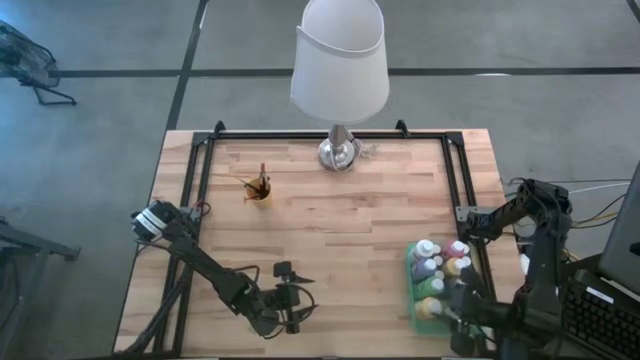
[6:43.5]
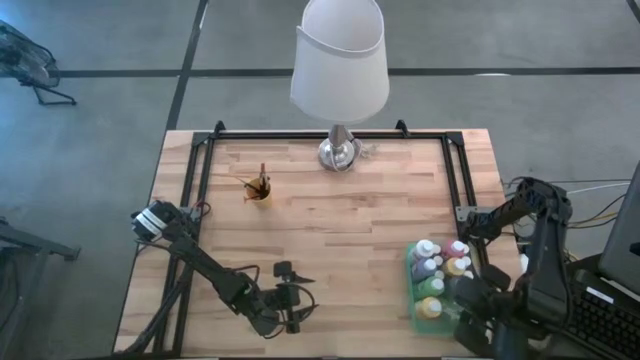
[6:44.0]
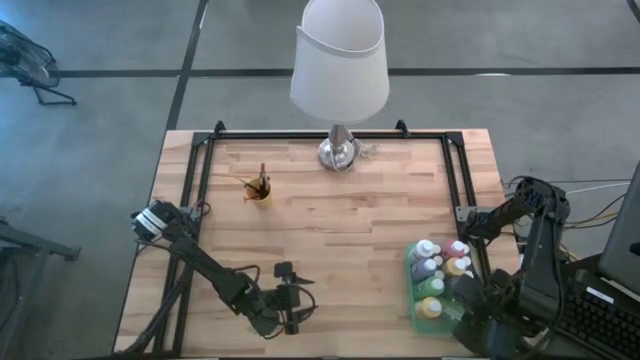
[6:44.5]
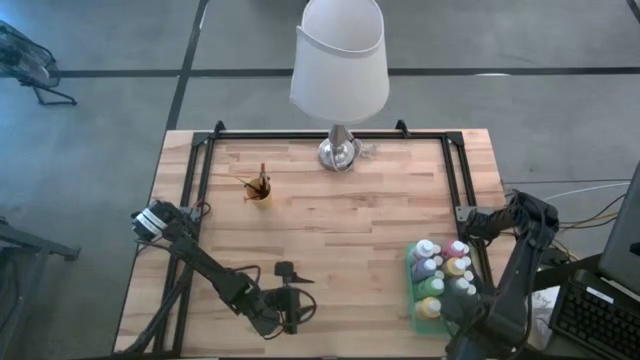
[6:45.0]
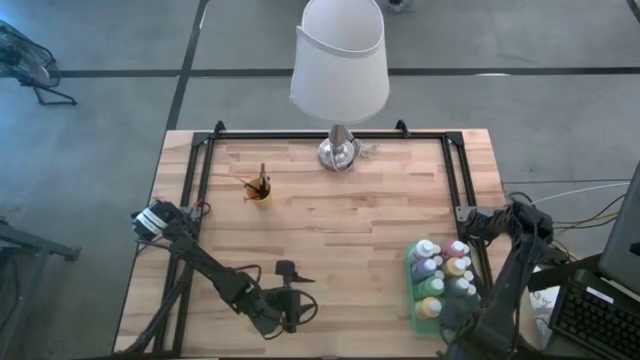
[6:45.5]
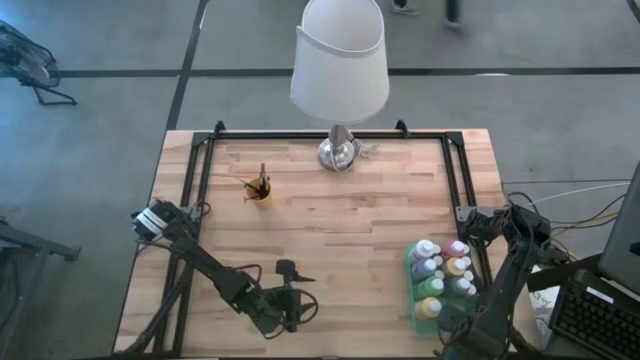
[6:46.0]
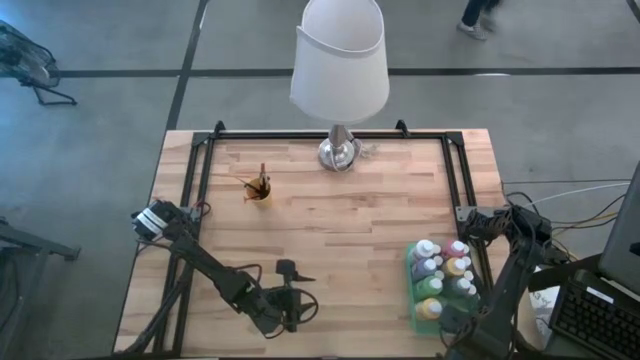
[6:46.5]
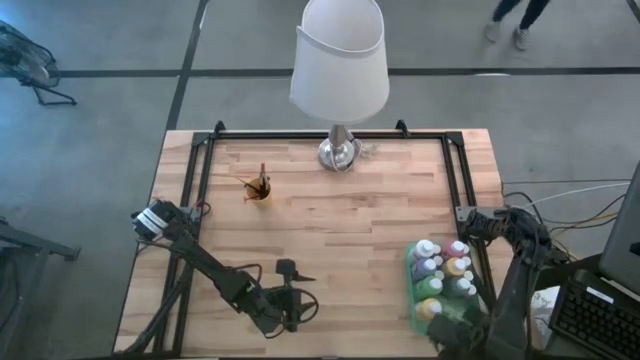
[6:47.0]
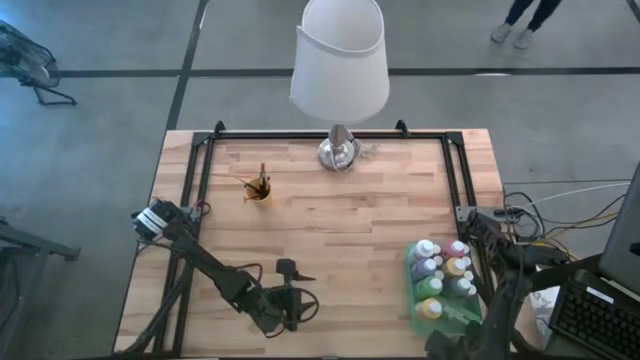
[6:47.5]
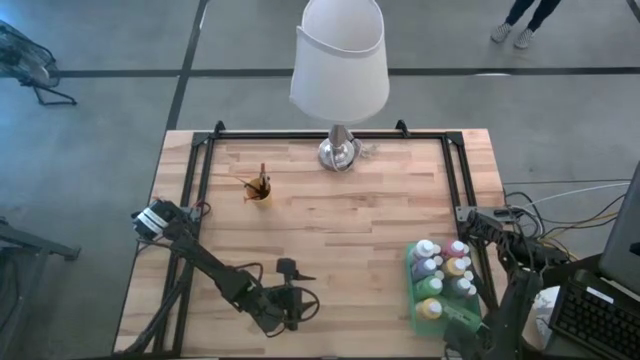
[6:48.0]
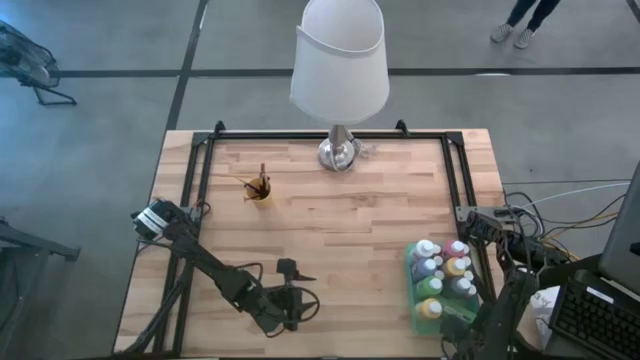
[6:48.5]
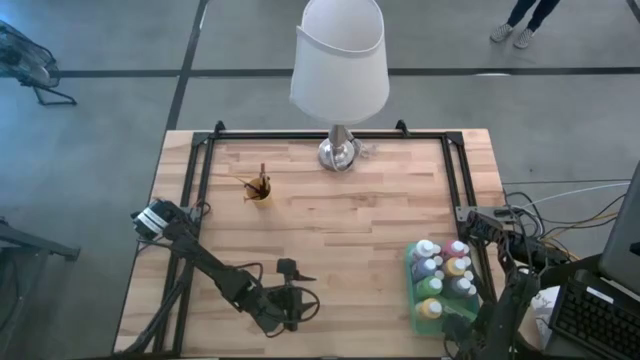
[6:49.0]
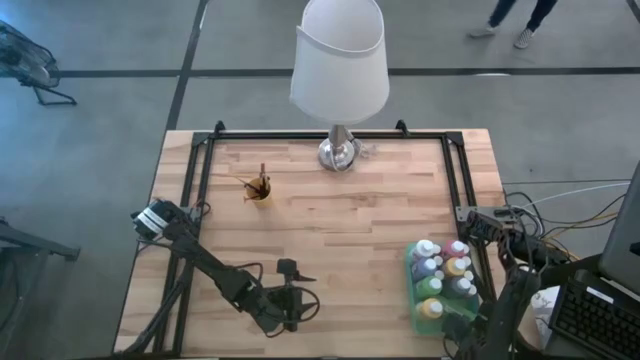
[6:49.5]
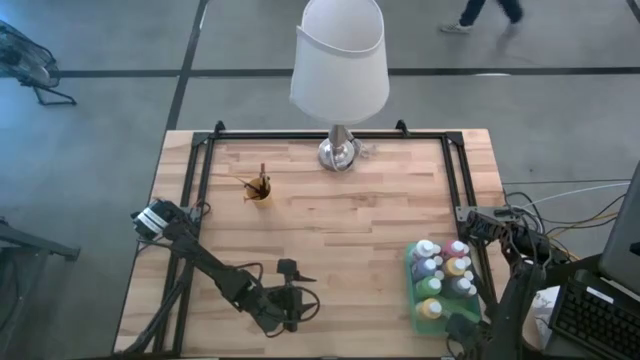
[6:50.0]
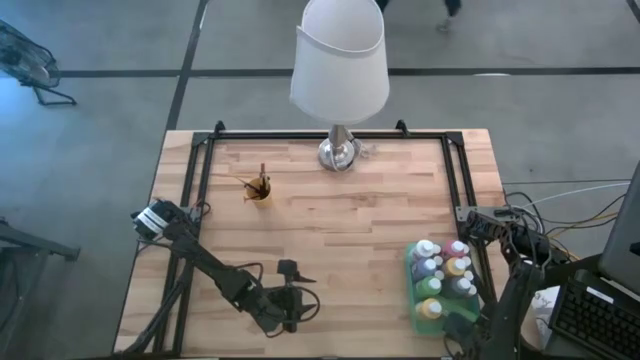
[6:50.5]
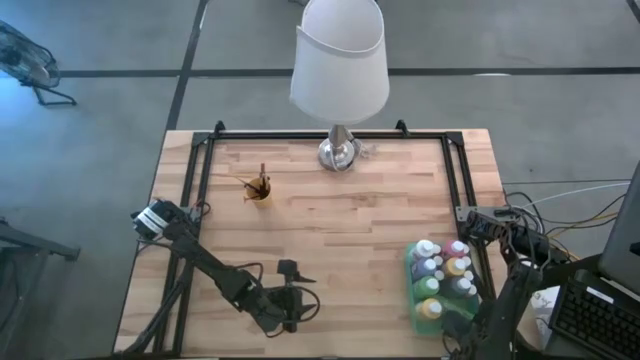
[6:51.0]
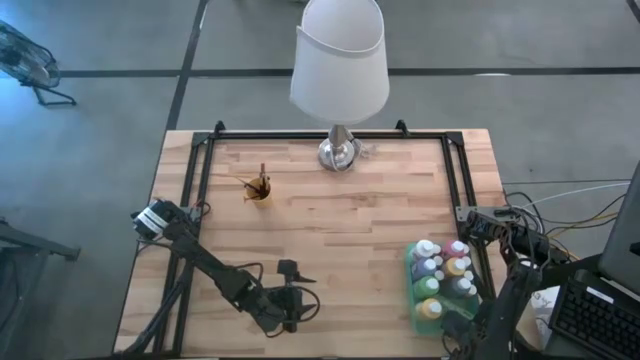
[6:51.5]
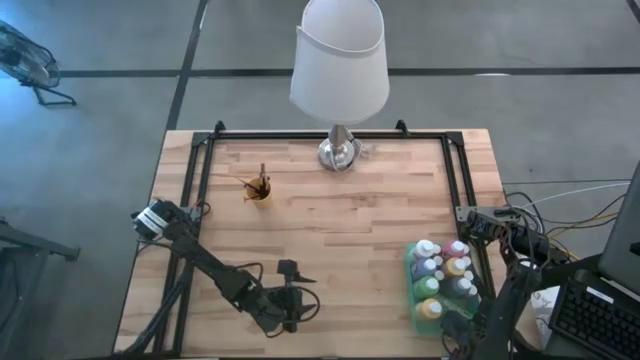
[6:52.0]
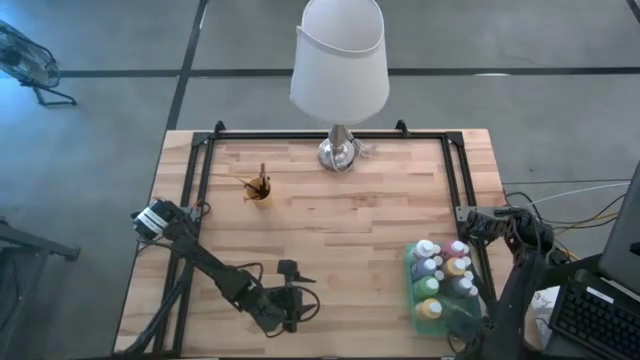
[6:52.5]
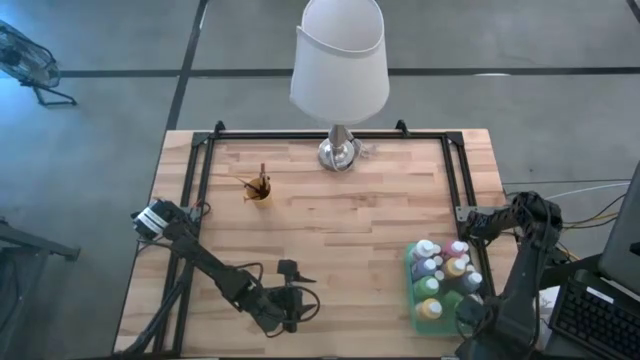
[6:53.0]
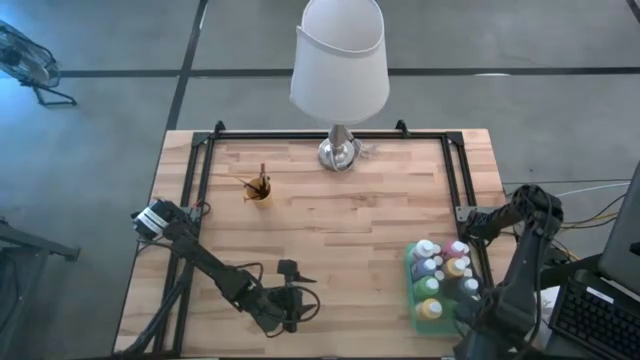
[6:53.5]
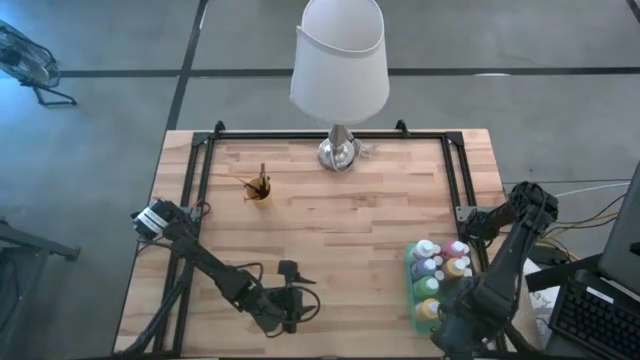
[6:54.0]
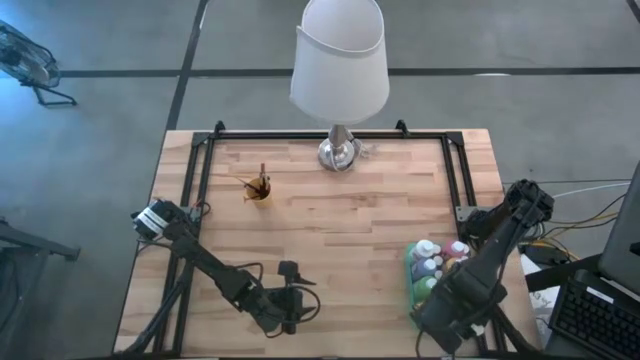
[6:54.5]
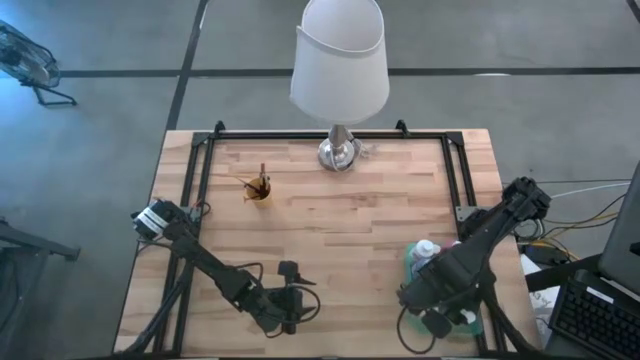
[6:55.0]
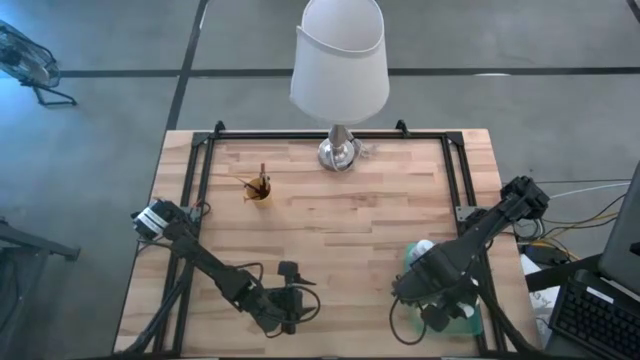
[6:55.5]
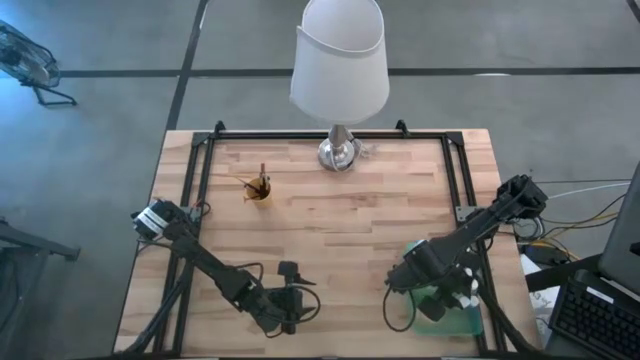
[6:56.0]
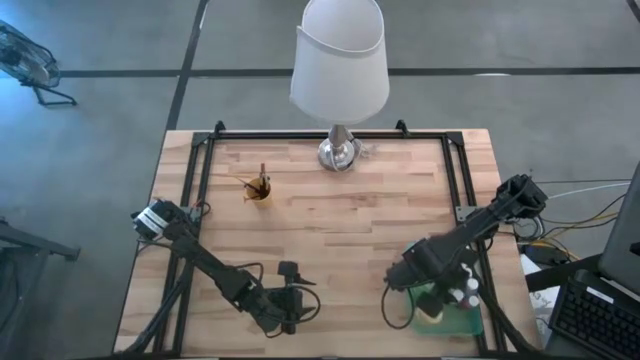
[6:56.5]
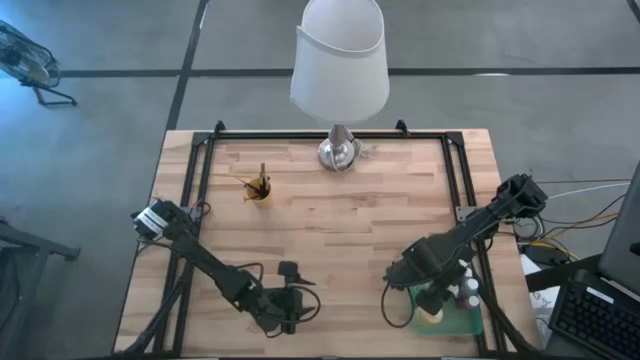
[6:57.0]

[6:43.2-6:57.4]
Task: Pick & Place Paint Supplies
Adjust the green paint bottle

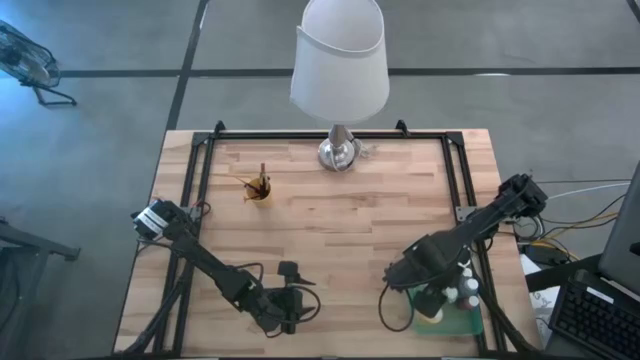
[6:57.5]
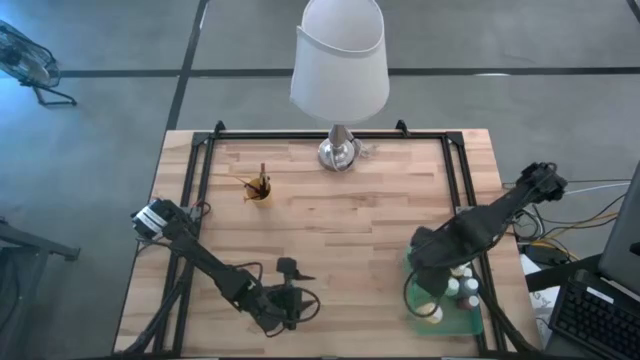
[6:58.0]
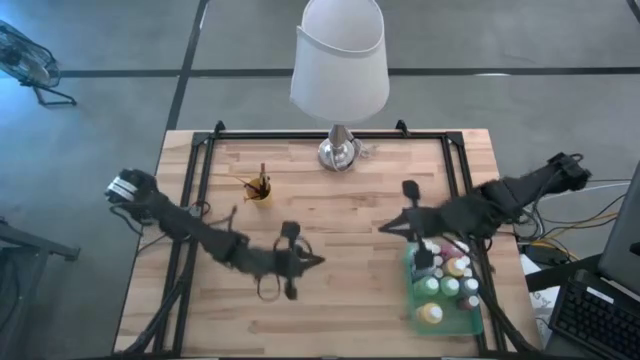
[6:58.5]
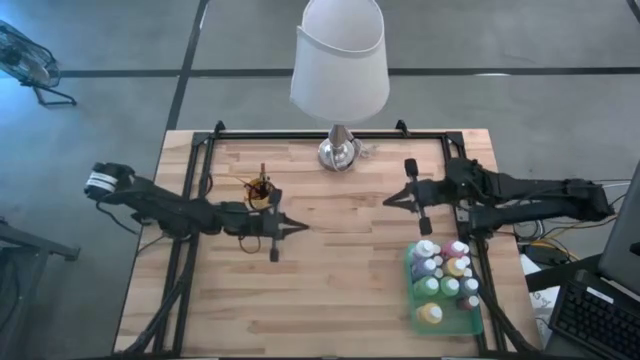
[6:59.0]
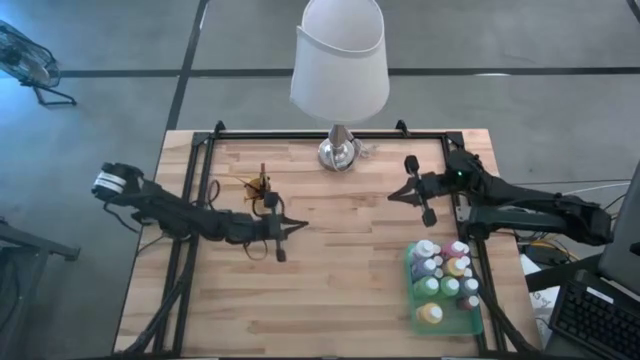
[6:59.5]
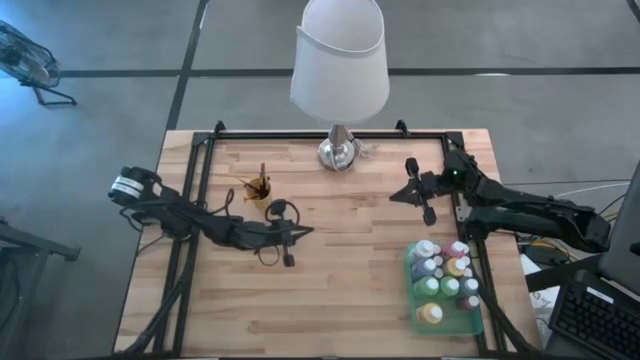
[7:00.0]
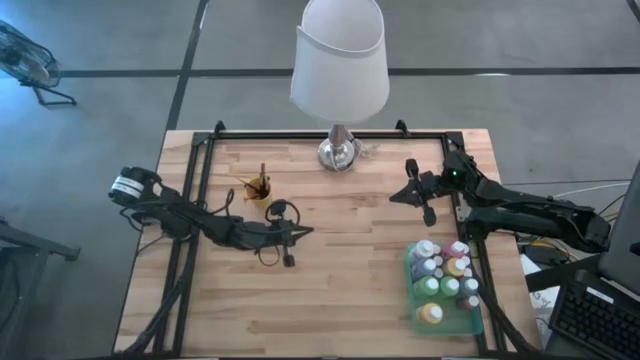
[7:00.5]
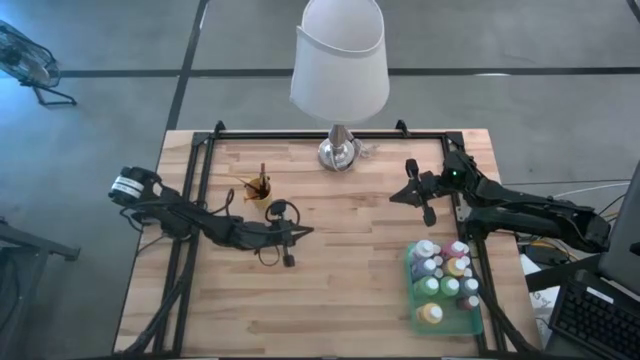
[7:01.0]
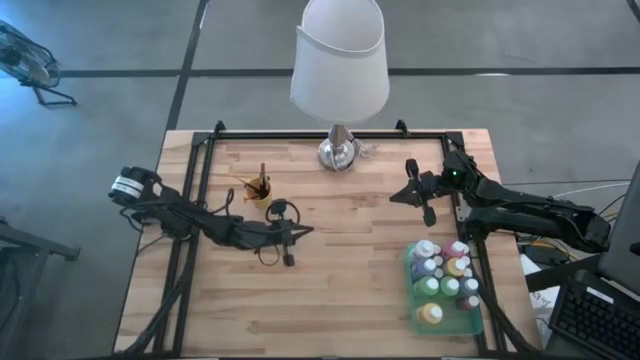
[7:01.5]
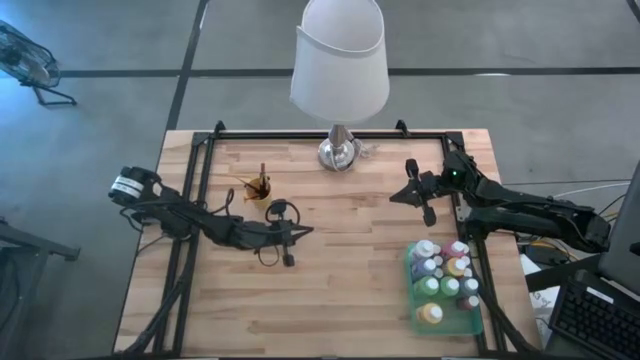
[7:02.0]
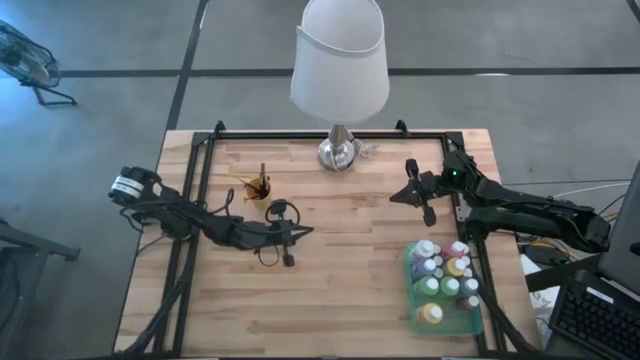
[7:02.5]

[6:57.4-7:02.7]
Return to Home Position
